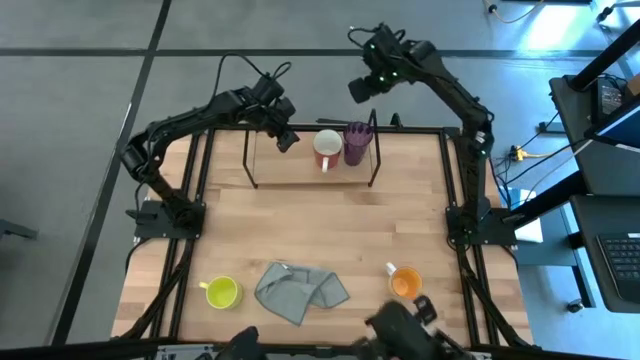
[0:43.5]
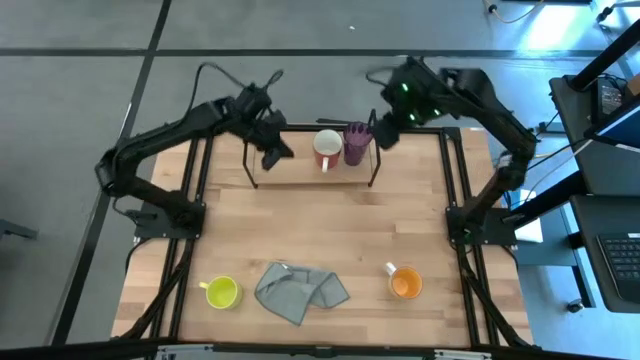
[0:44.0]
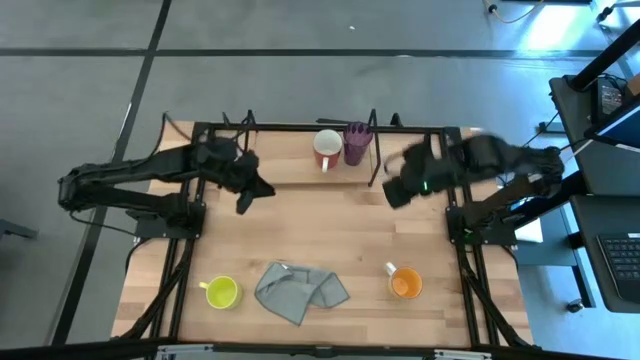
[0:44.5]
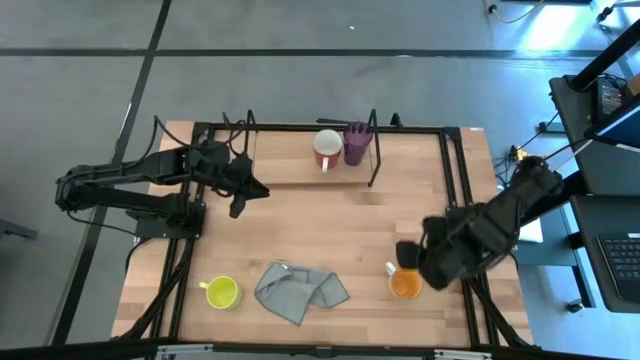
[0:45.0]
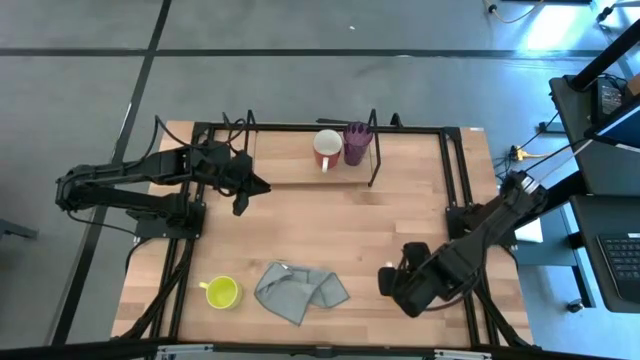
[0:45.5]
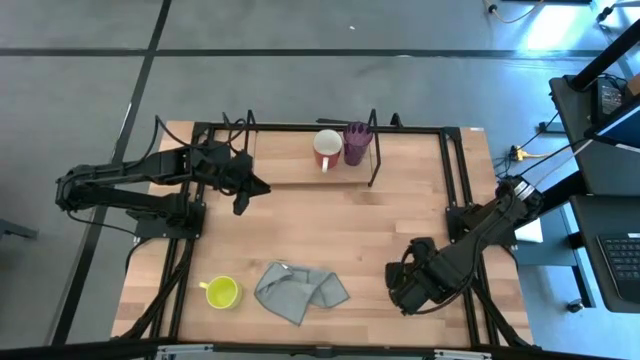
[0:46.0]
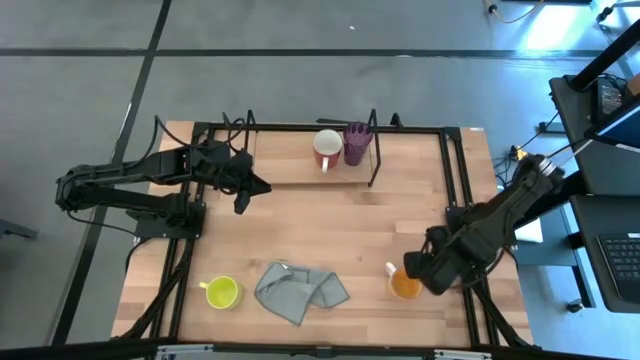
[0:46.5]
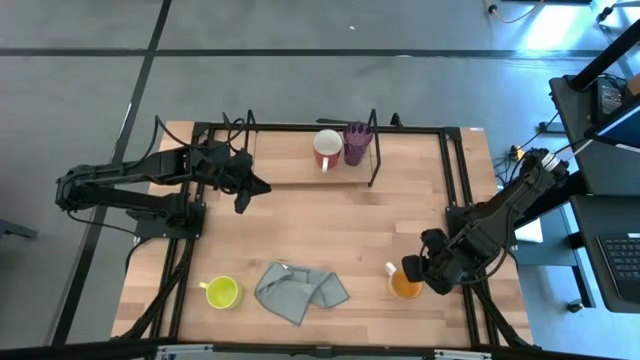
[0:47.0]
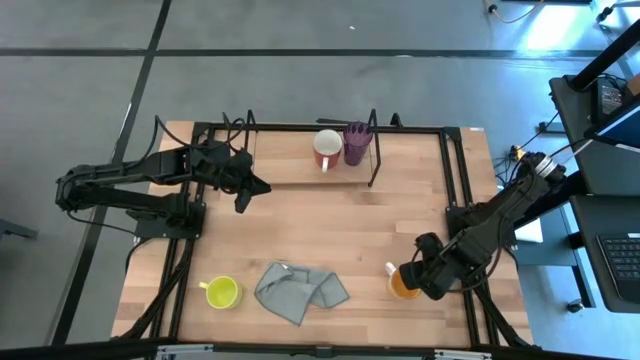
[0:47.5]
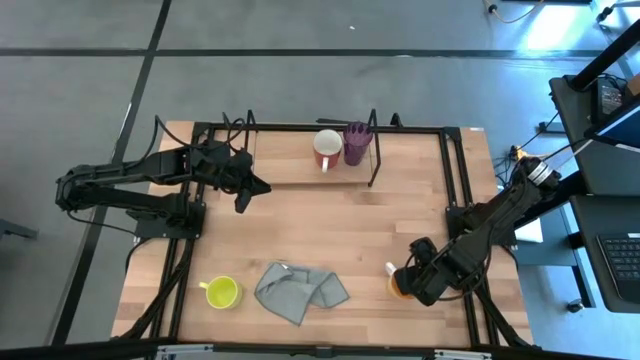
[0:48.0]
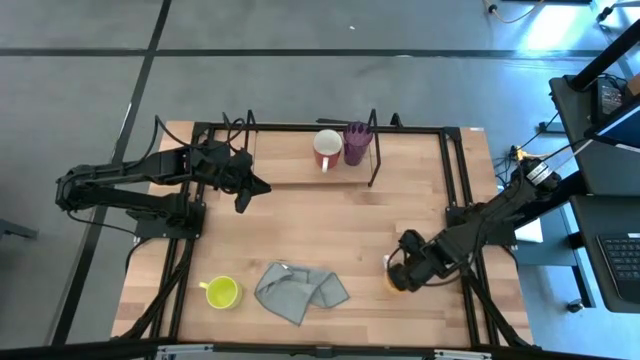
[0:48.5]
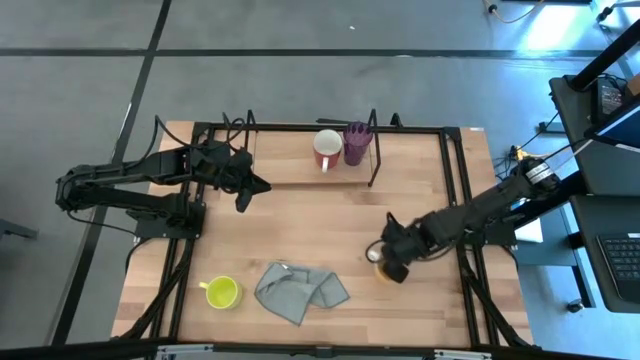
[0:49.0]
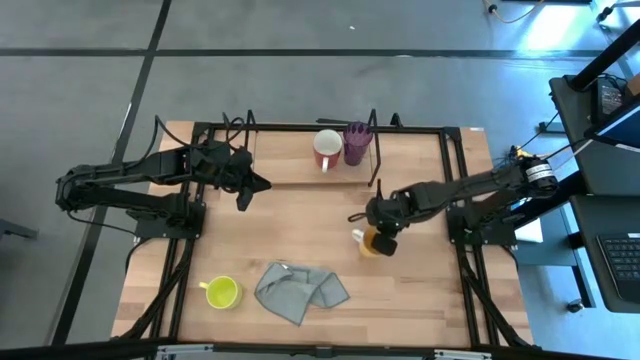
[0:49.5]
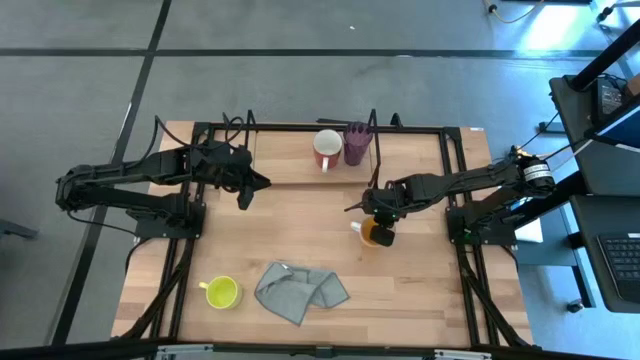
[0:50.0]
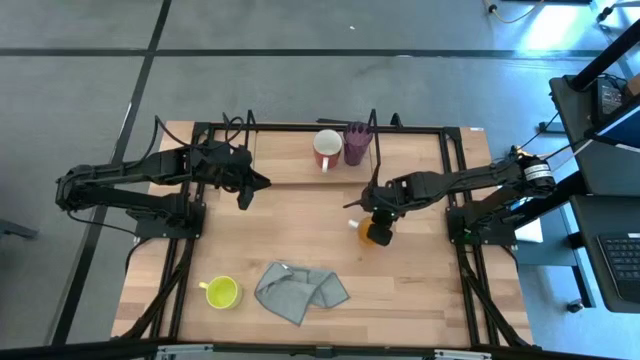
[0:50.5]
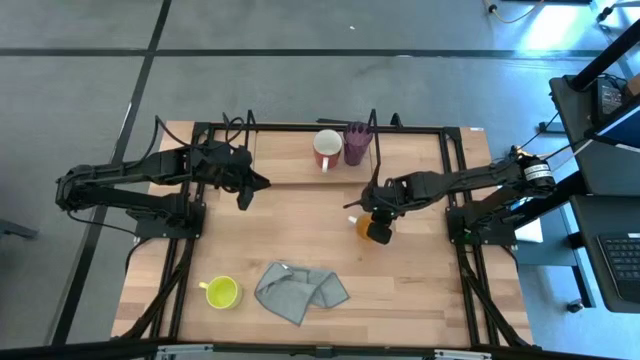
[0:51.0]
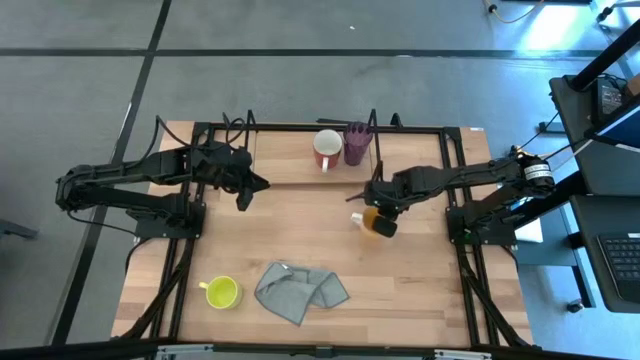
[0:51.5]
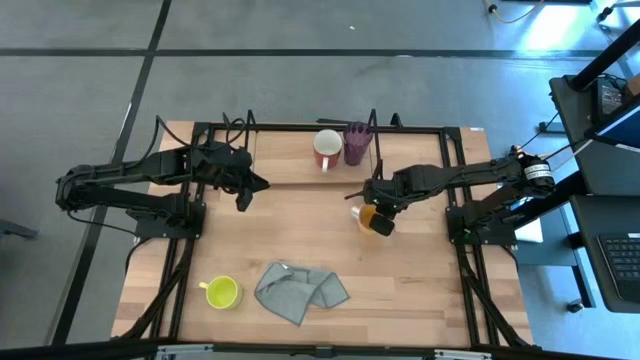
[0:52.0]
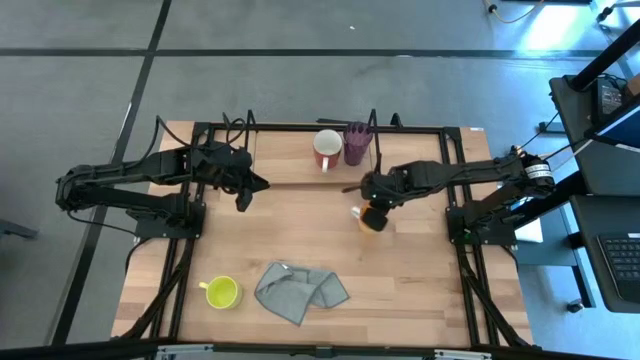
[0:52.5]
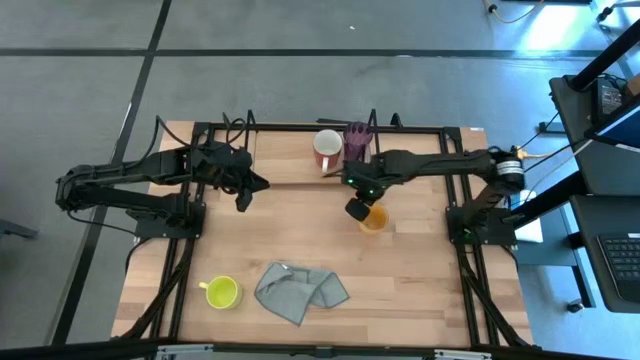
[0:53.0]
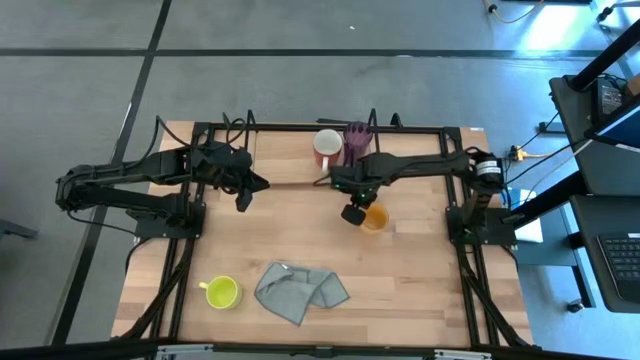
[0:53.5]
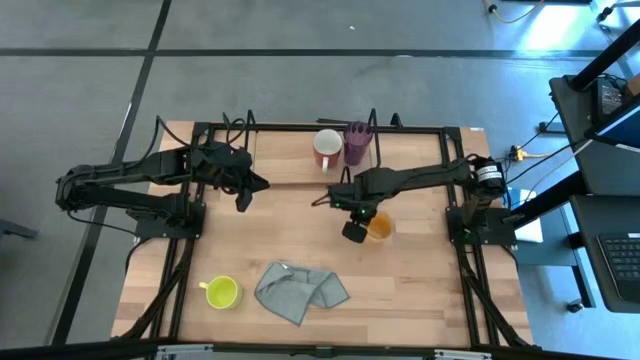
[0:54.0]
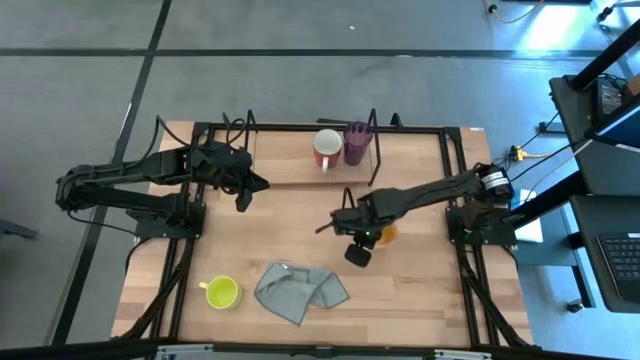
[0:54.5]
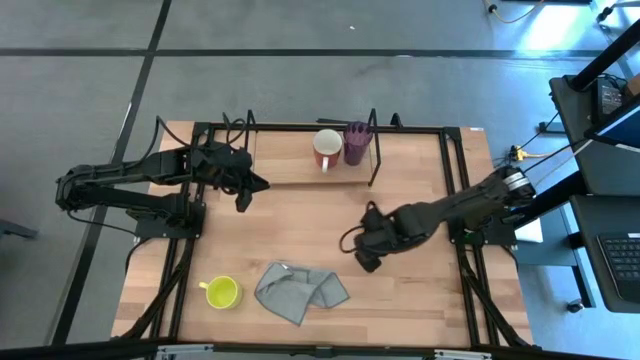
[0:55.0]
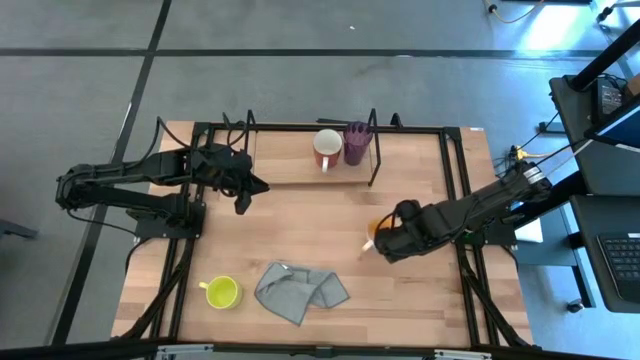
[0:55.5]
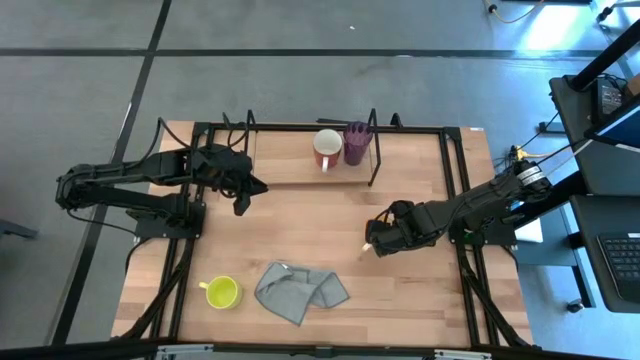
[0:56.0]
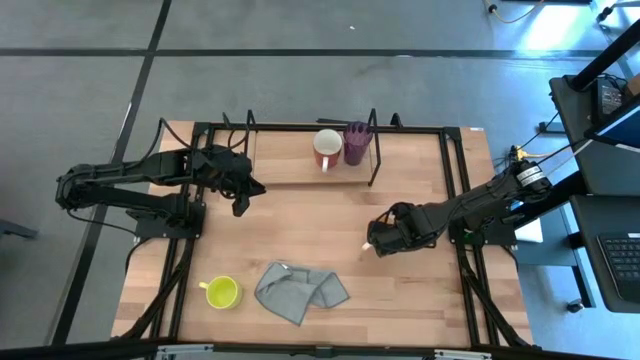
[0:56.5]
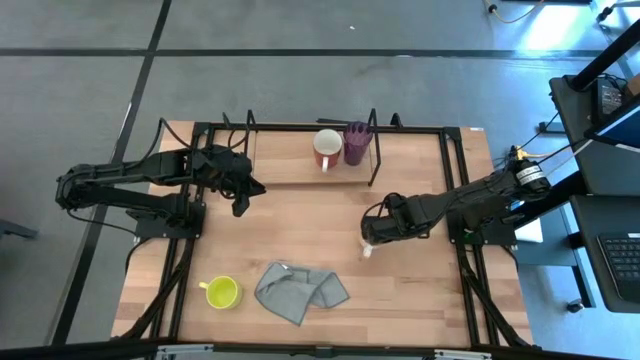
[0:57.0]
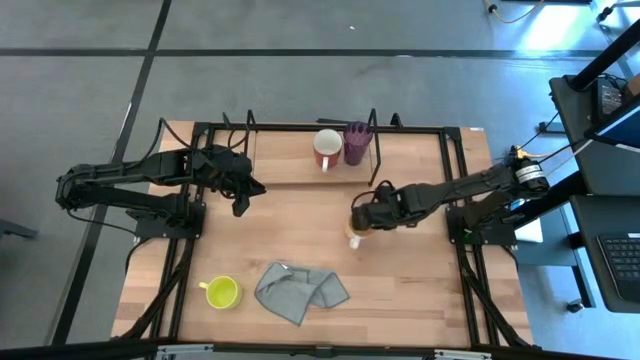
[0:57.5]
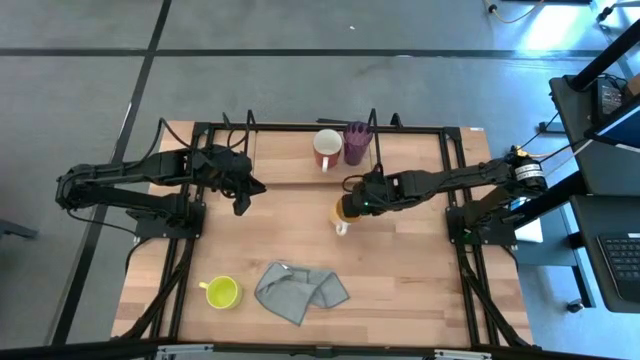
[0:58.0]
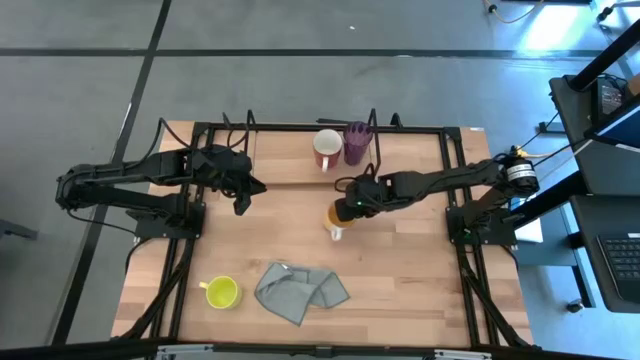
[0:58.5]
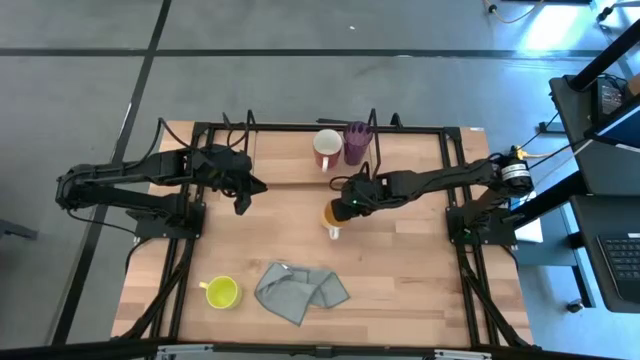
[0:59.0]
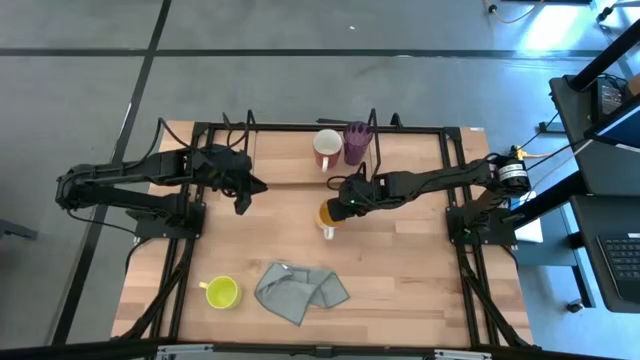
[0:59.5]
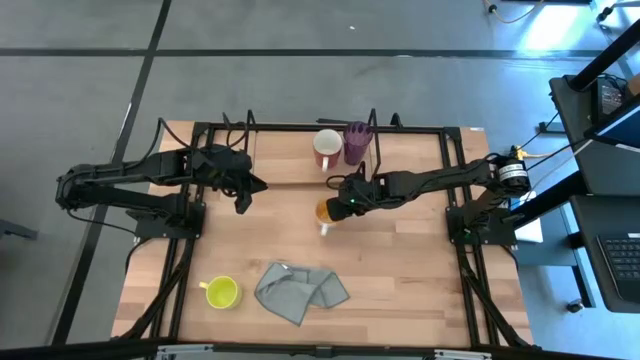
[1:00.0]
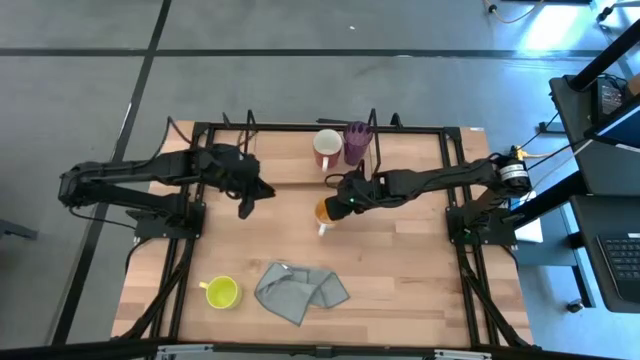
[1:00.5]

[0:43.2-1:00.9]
Task: Stack small to large cups/mugs on shelf
Put the yellow mug on the shelf

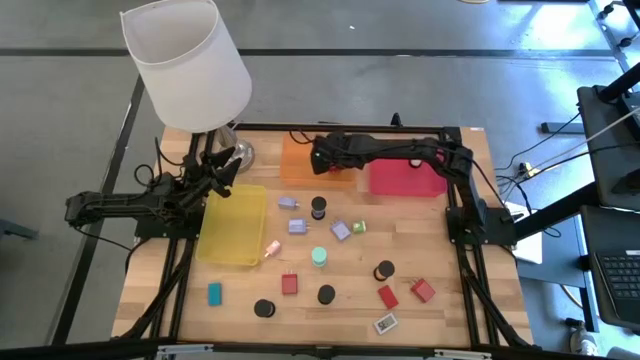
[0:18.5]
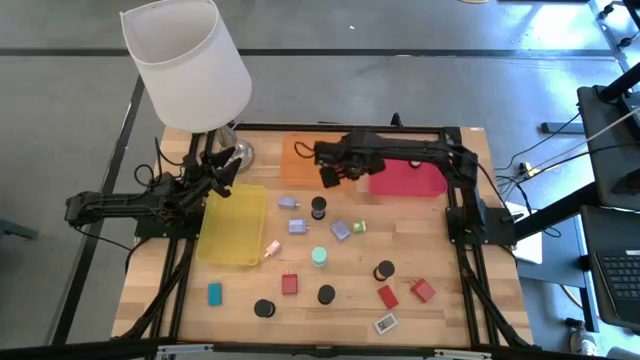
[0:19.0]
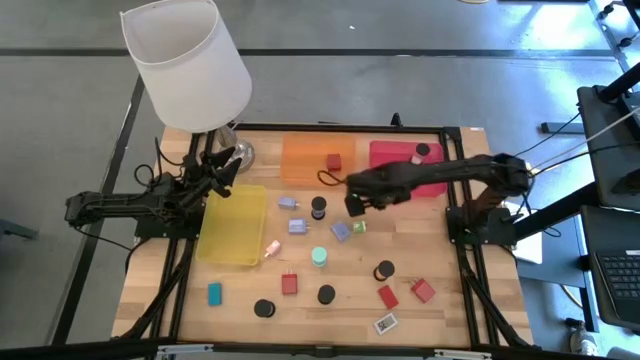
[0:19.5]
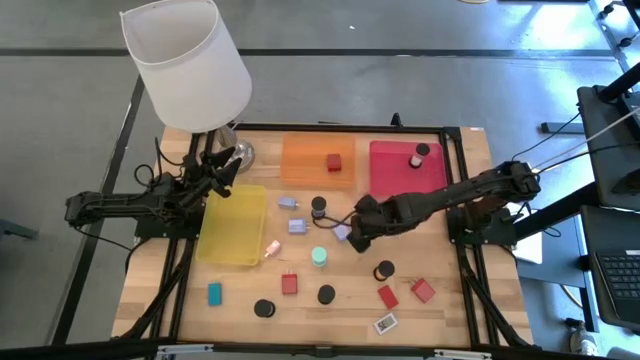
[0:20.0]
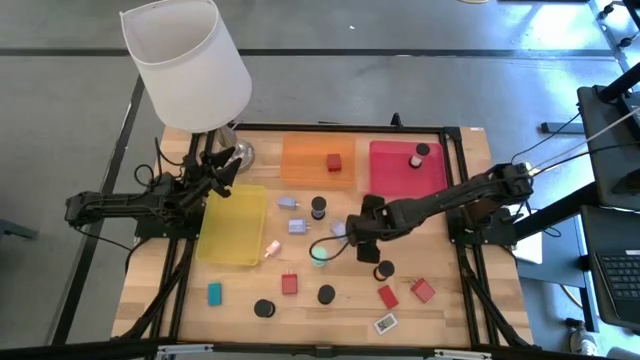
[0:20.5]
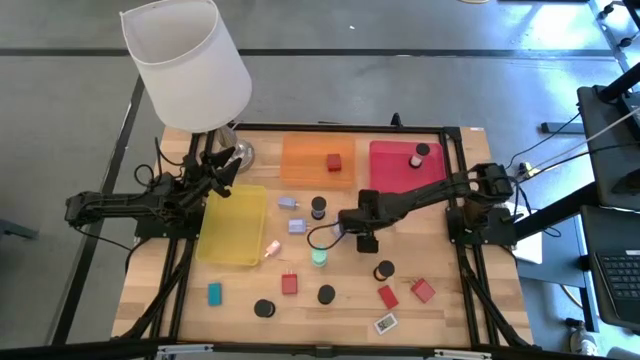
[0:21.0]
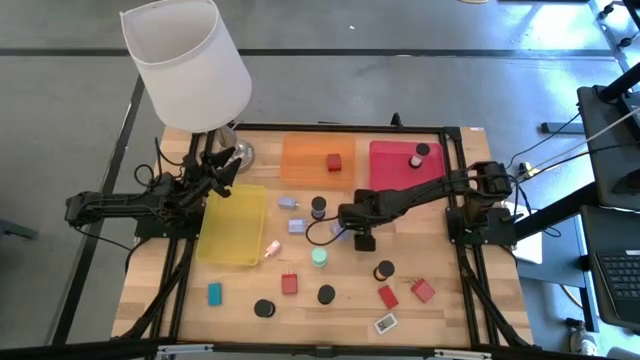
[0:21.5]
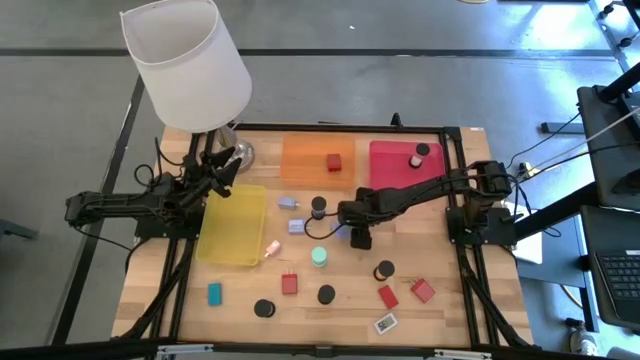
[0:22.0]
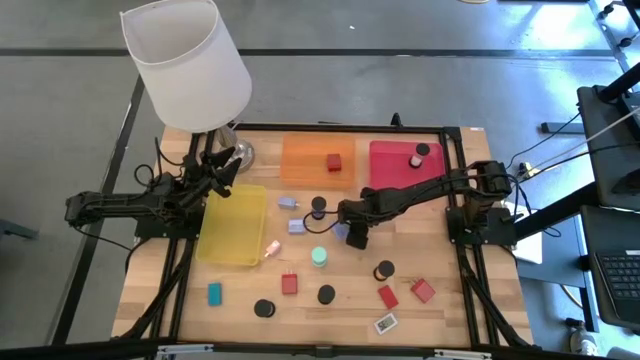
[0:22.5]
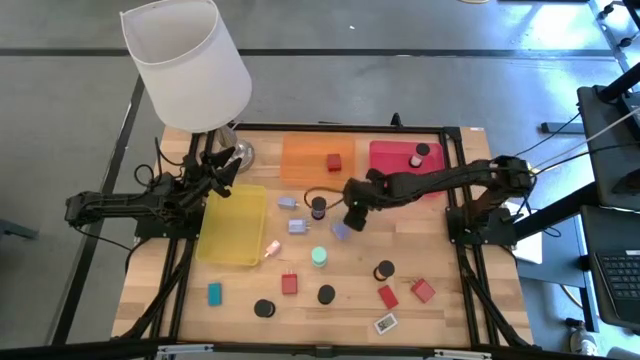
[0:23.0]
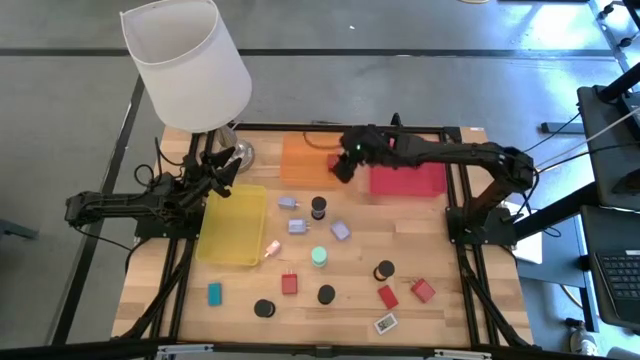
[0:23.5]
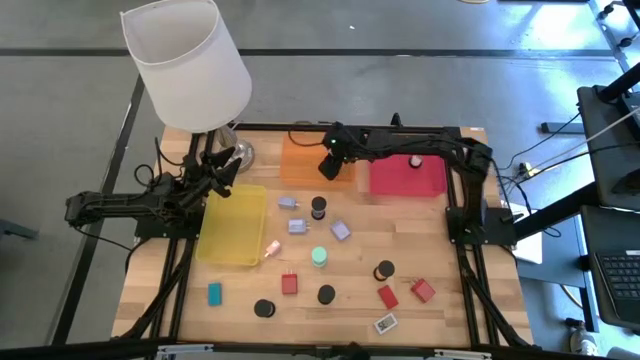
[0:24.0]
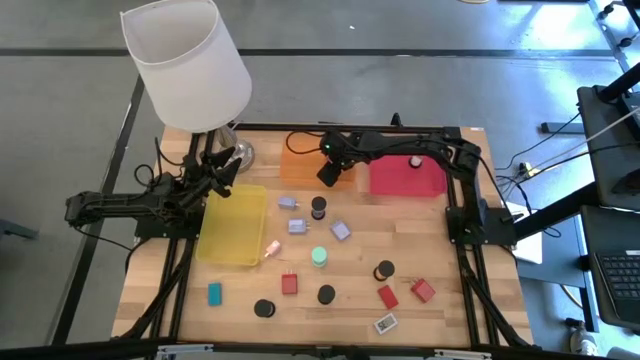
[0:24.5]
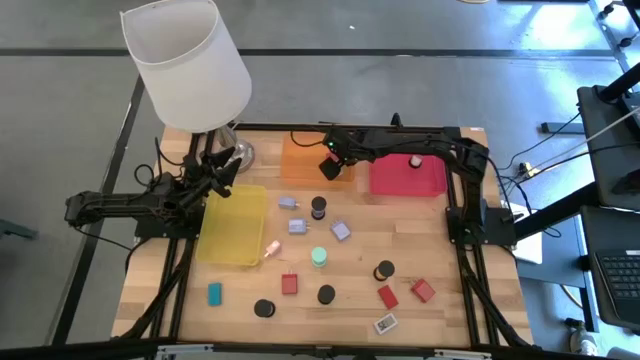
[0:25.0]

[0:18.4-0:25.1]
Task: Pick & Place Office items
Put the green charger adapter into the orange bin
